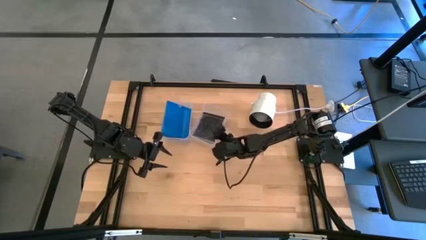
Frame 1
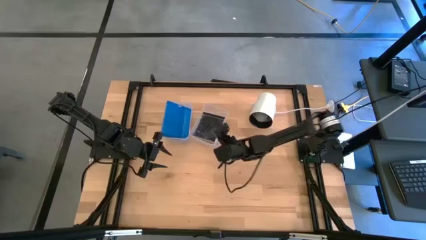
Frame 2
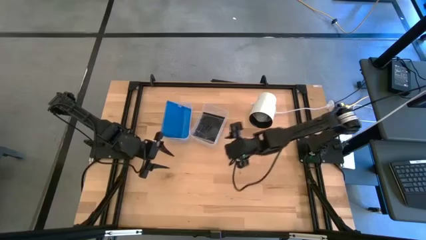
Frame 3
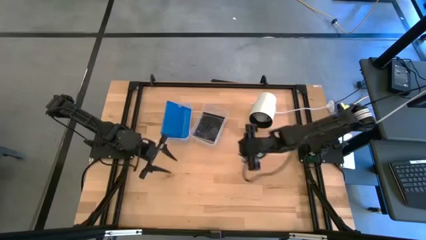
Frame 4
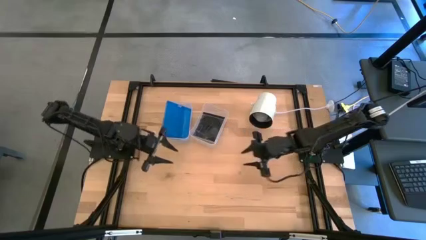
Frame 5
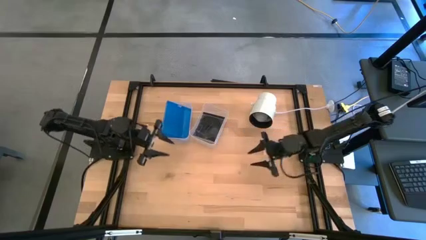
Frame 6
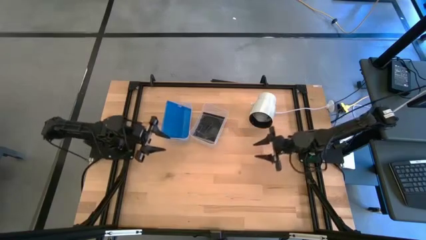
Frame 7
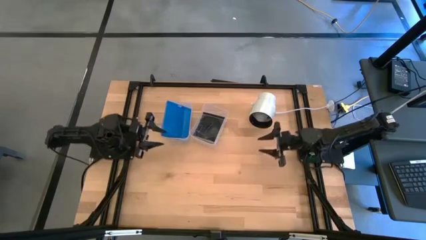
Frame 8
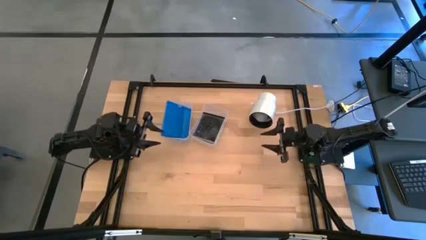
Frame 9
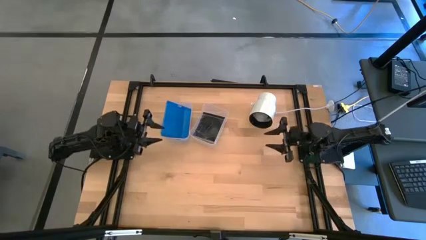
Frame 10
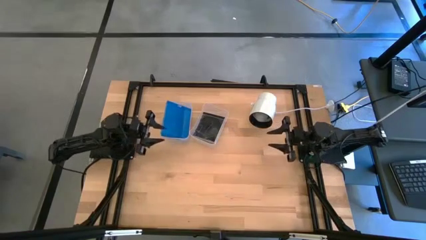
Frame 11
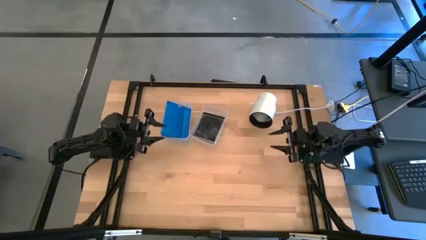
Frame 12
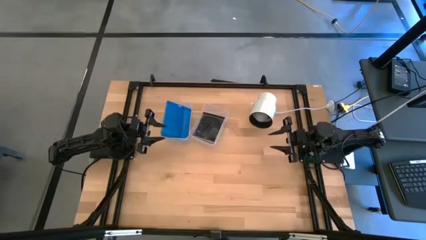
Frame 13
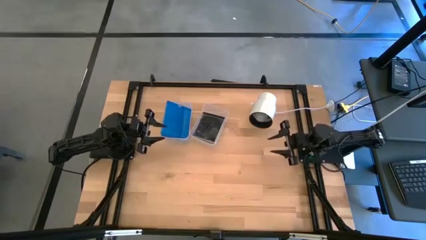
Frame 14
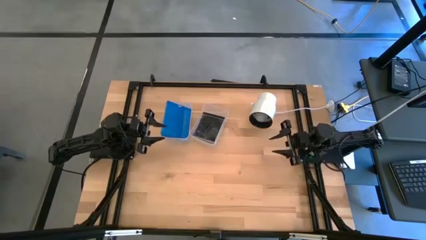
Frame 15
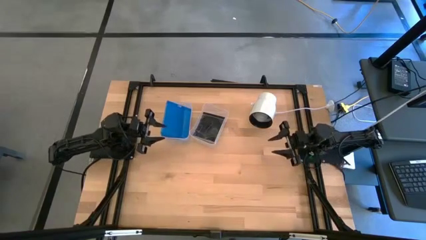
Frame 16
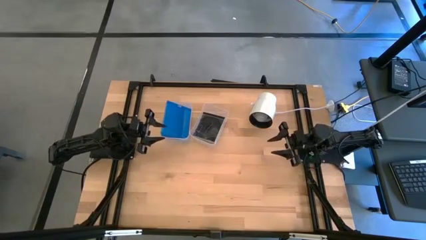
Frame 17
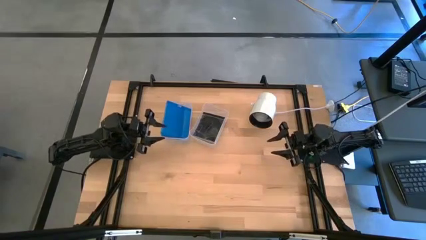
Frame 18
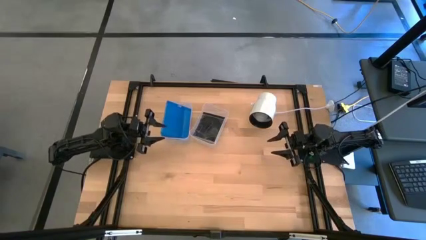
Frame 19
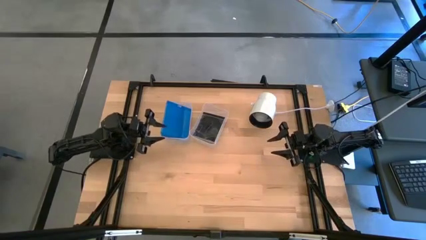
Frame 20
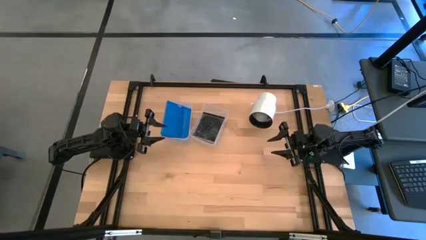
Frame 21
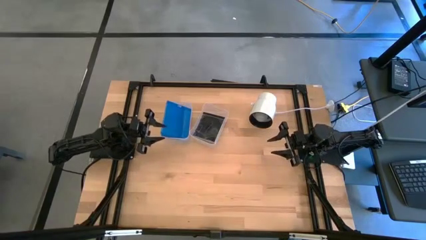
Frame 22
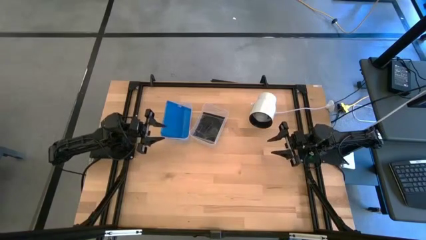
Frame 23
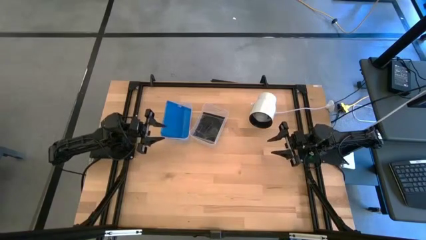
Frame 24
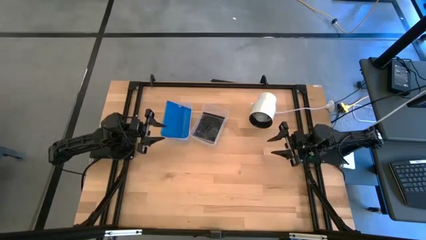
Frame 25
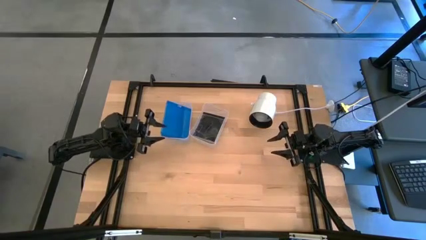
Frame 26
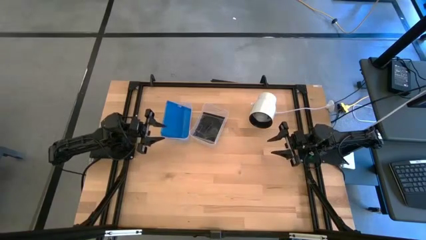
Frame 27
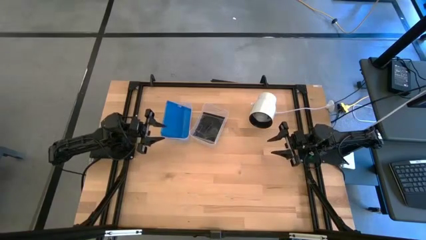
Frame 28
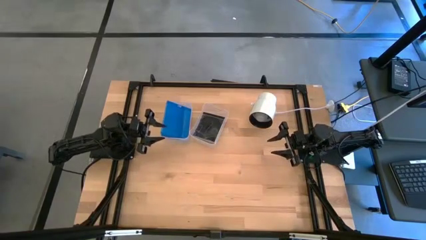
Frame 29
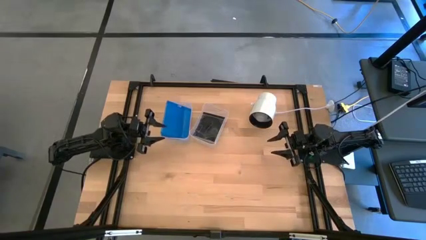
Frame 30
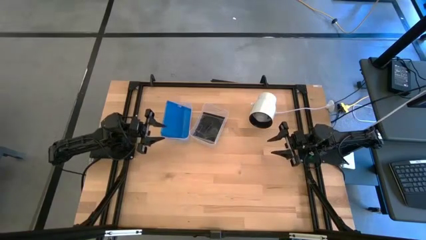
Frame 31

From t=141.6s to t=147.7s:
Task: Pick & place jewel cases by type
Return to Home Position

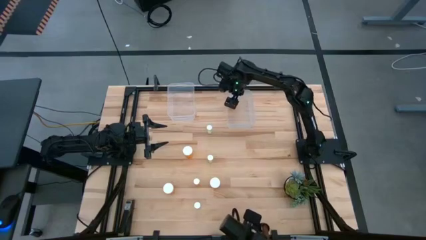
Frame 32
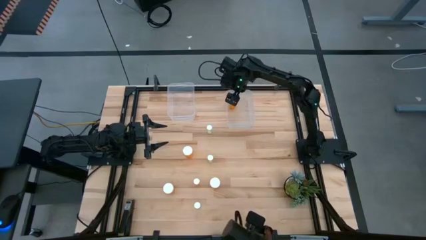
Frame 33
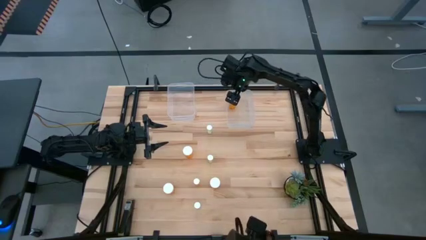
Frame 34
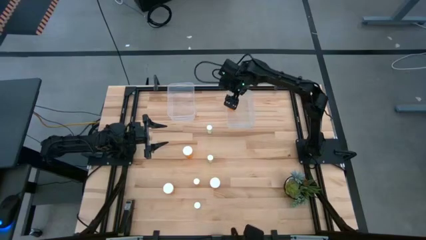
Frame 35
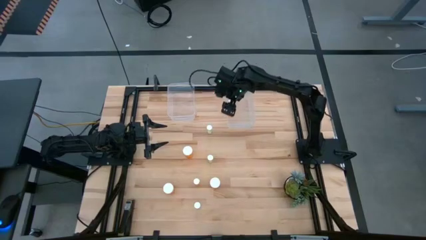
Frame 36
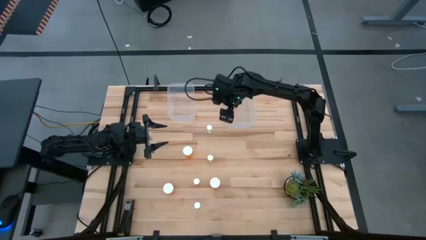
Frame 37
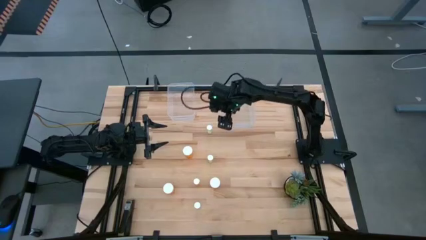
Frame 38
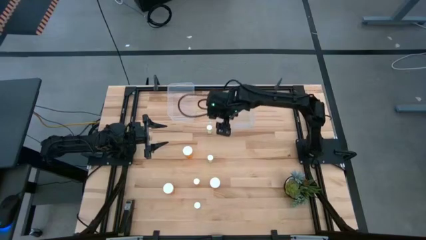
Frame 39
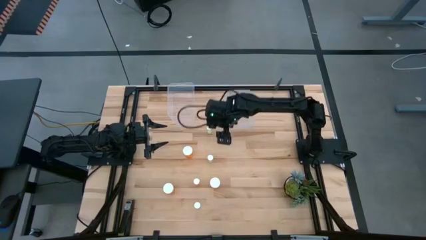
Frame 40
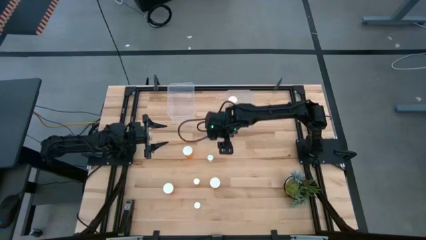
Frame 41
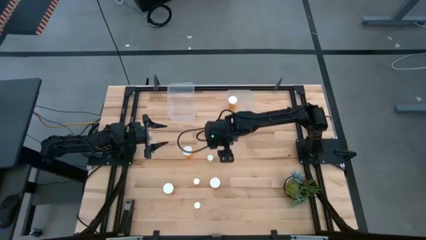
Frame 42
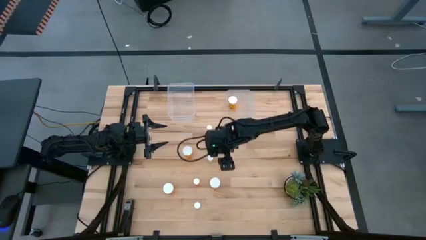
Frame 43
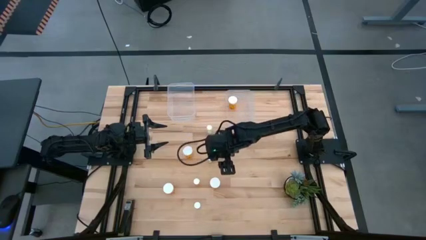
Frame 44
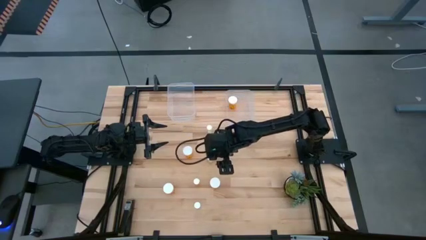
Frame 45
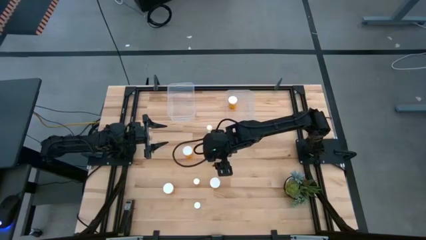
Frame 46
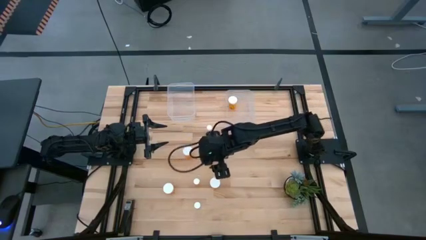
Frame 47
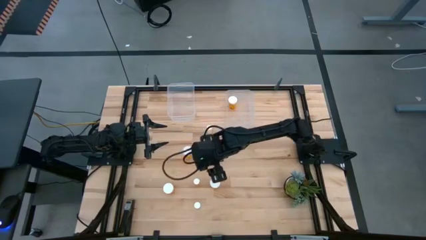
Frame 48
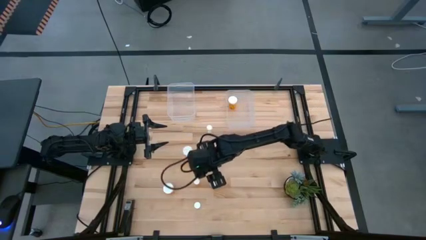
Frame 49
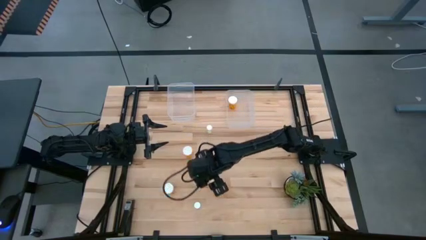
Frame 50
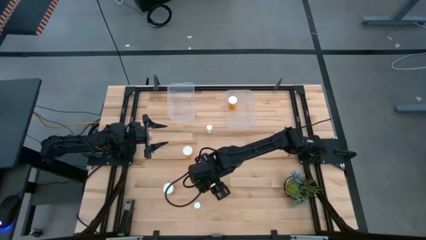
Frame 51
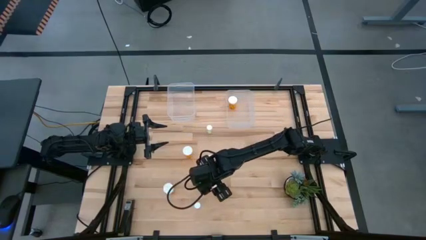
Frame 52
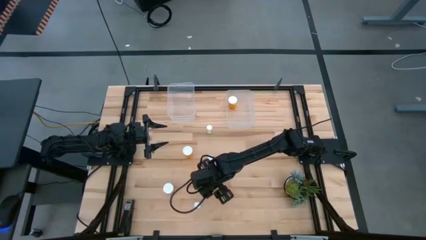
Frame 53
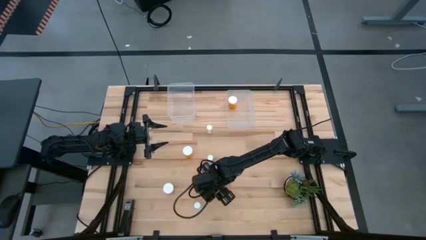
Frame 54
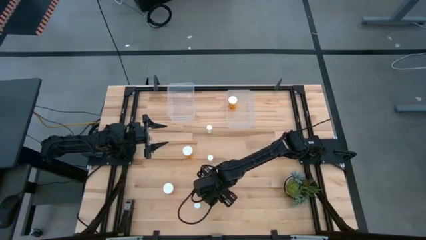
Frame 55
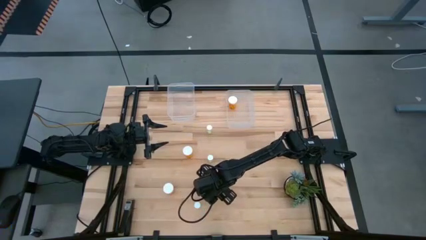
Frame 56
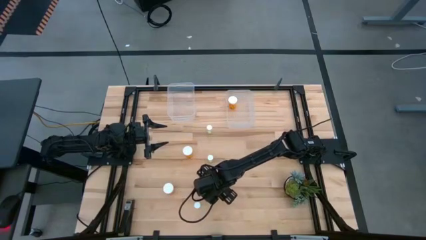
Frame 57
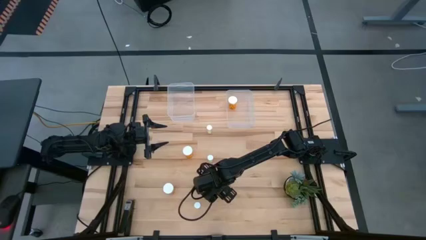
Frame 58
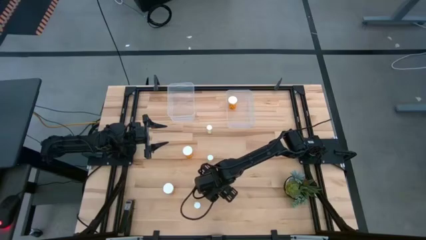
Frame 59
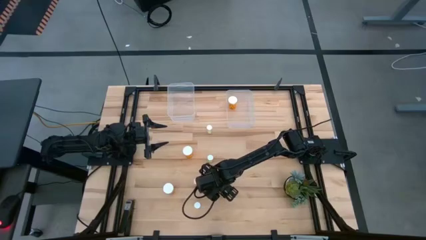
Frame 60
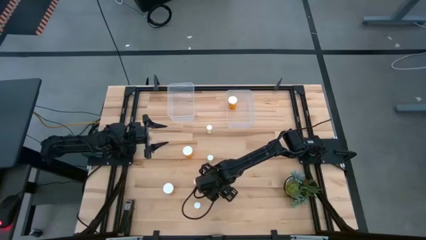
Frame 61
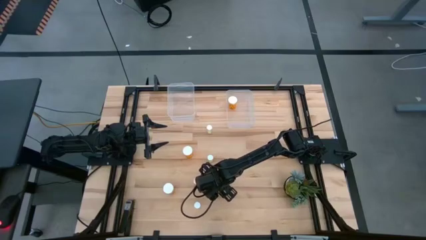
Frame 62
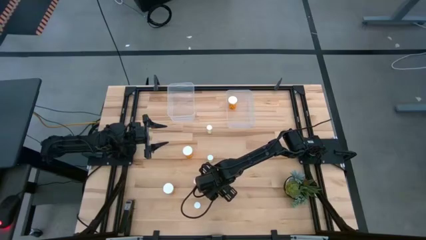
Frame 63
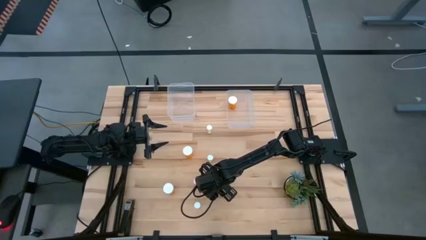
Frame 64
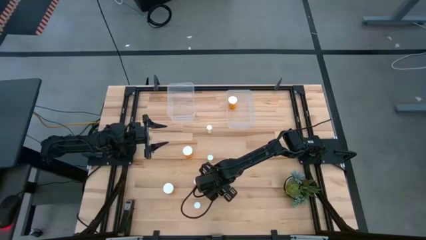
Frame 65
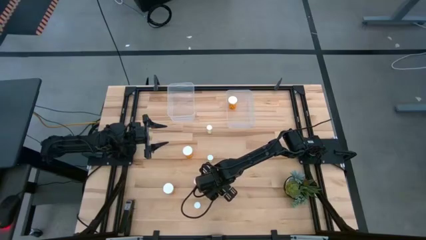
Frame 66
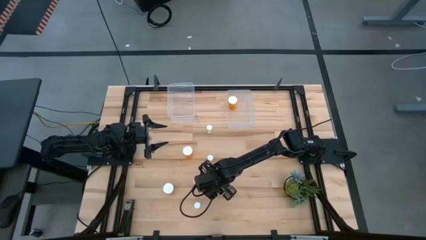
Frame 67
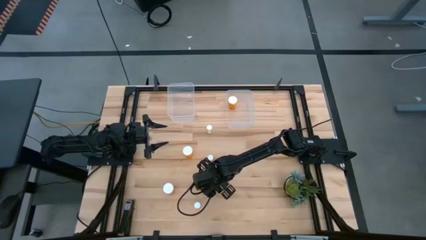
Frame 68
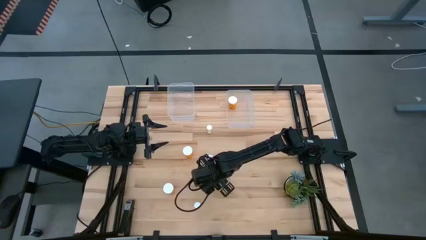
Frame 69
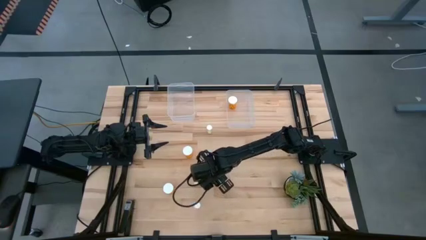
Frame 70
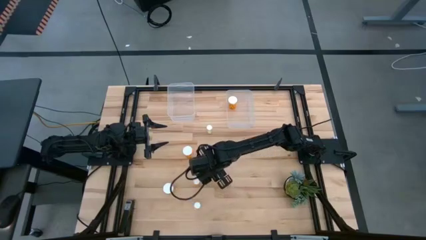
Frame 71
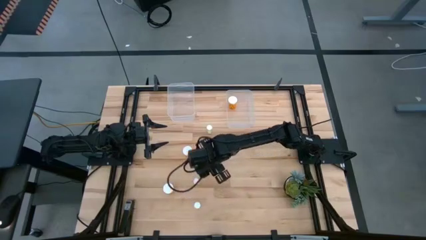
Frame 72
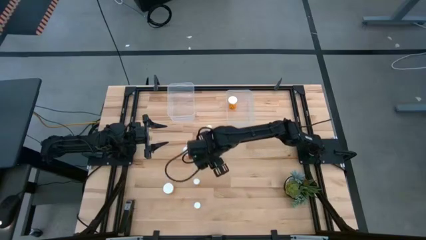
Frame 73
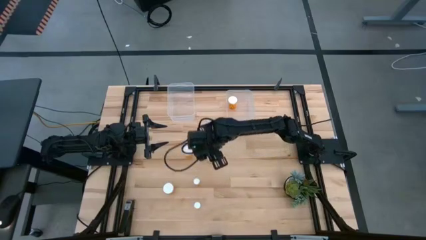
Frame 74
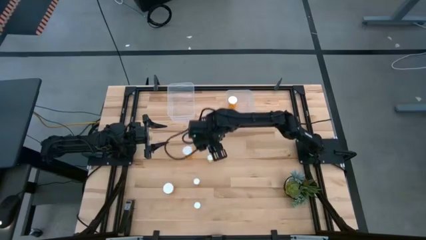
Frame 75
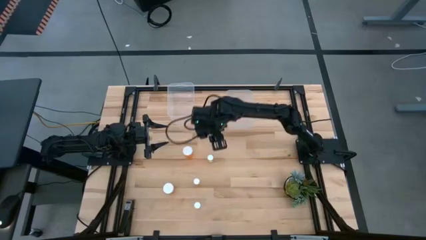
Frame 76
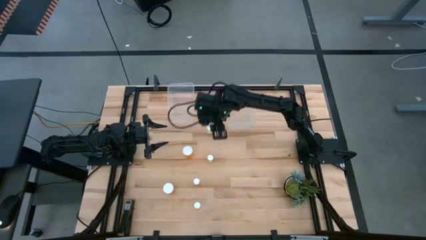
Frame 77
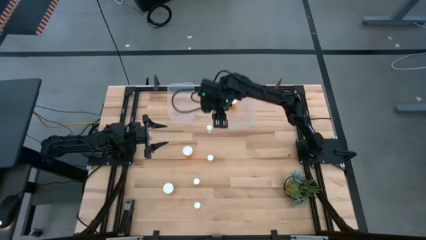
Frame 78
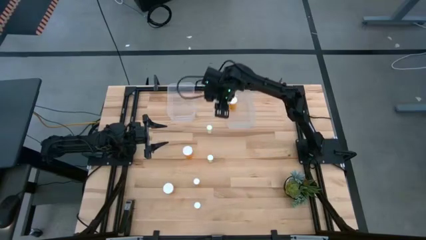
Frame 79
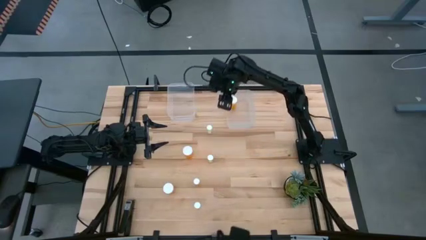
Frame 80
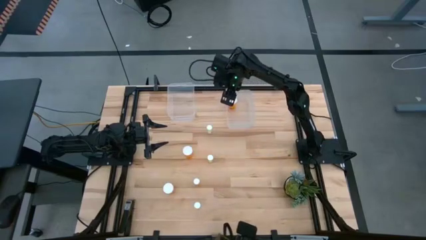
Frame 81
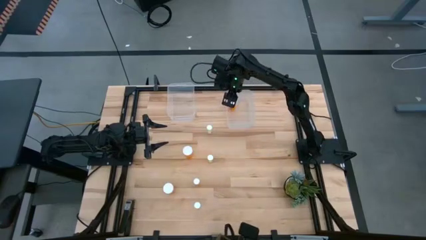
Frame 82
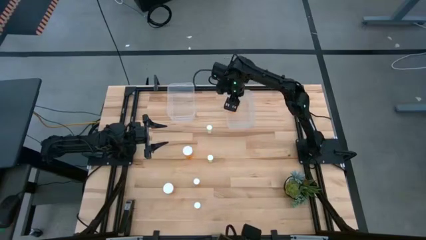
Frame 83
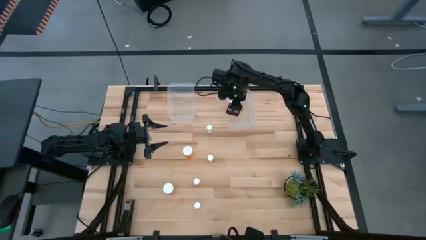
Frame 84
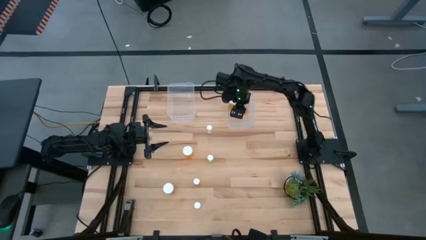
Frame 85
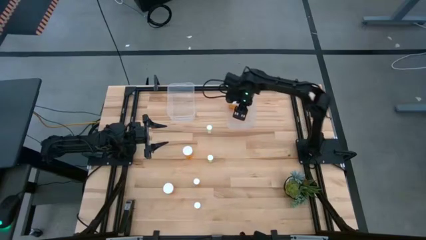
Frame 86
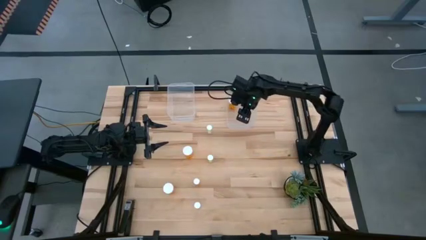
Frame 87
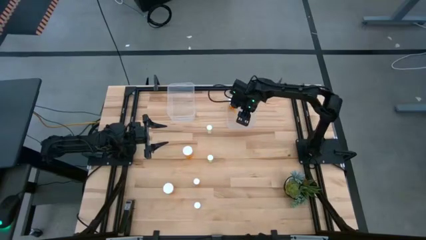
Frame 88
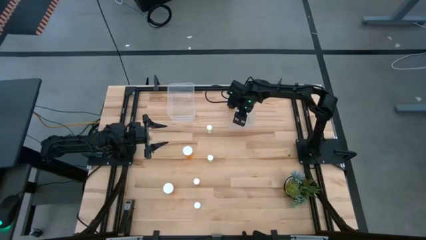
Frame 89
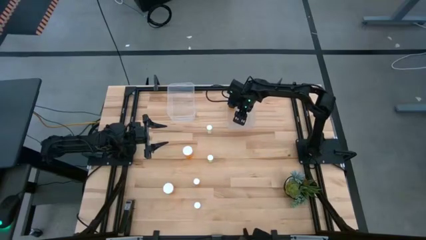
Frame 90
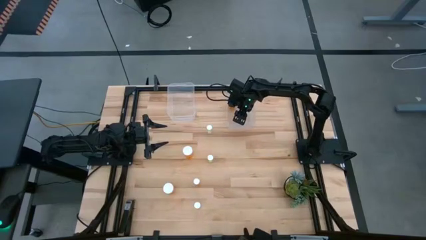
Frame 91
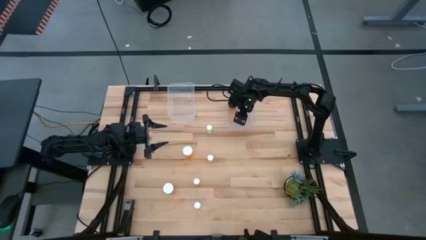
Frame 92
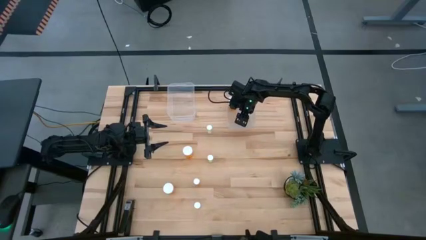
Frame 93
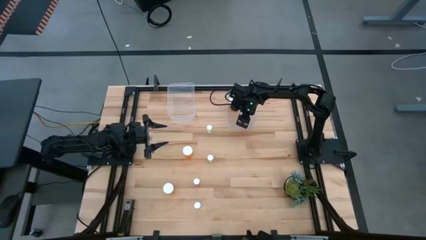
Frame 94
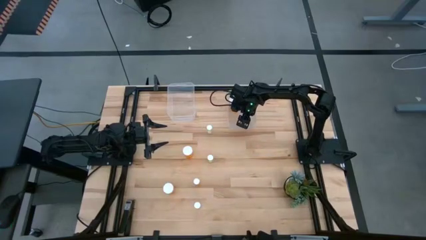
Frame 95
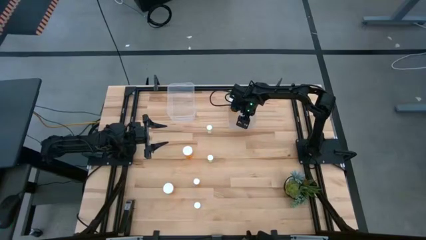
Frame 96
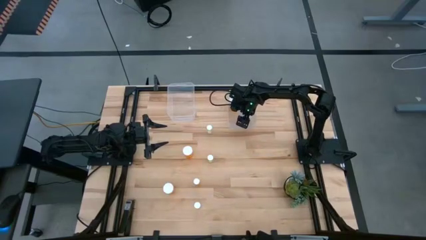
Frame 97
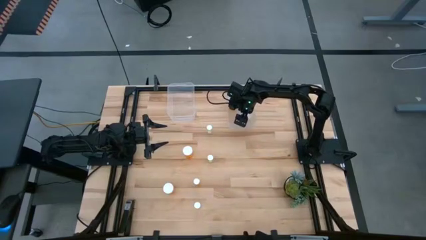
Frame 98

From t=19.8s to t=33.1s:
Task: Pick and place medicine bottles into bin by pill shape (circle, oval)
Put the large orange pill bottle into the right transparent bin
